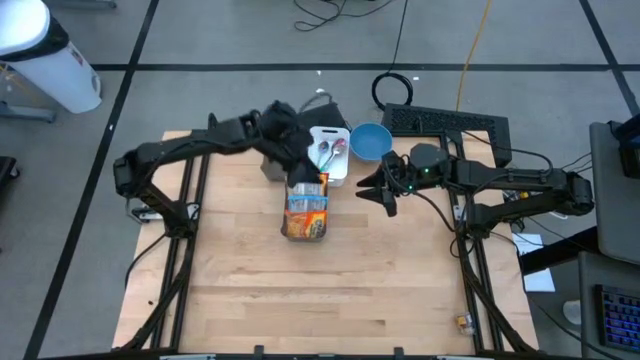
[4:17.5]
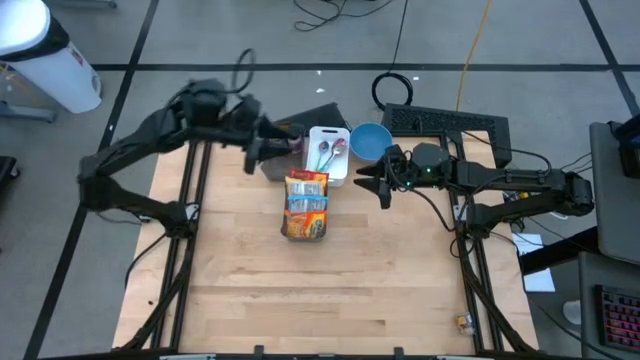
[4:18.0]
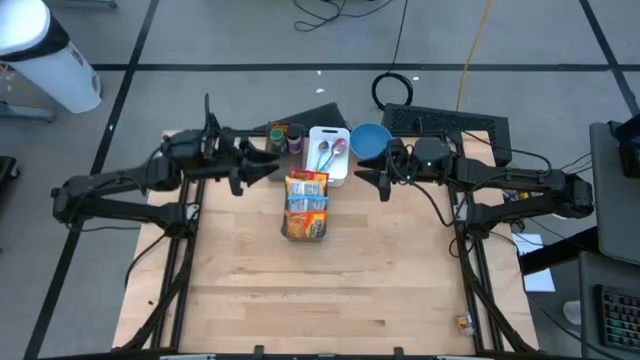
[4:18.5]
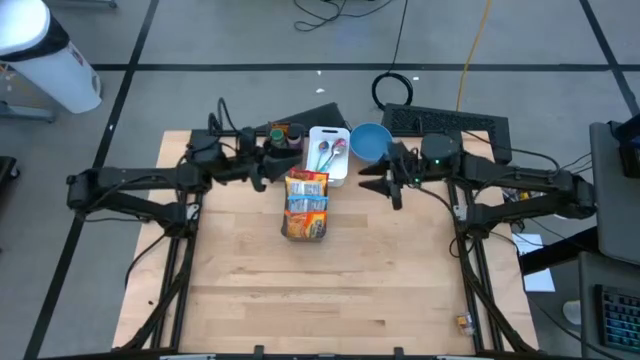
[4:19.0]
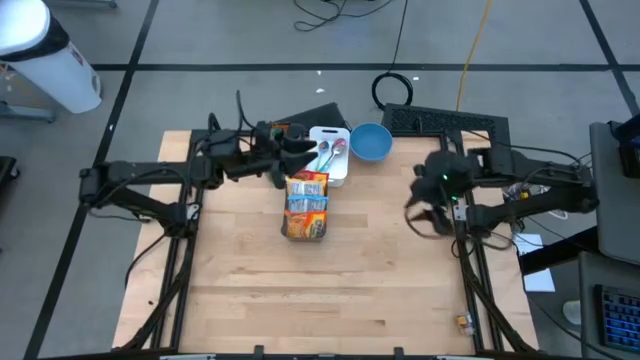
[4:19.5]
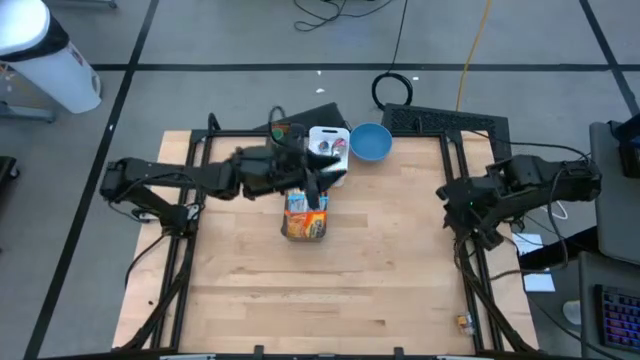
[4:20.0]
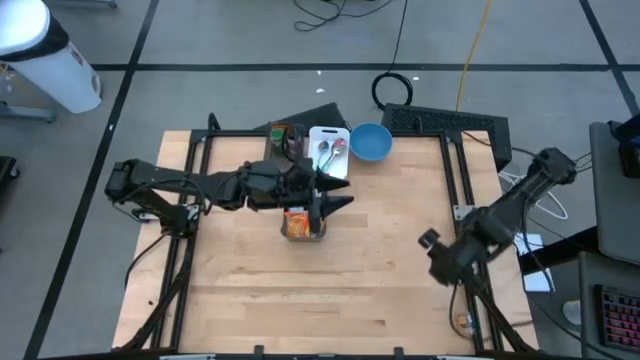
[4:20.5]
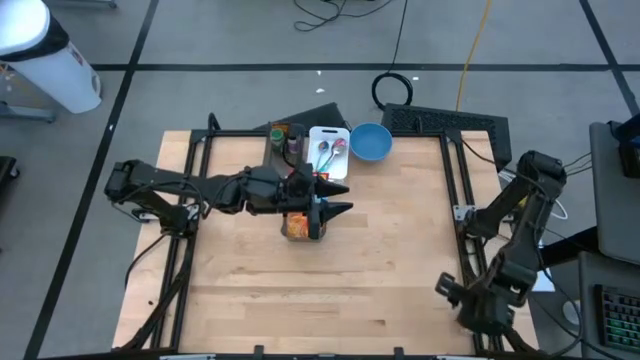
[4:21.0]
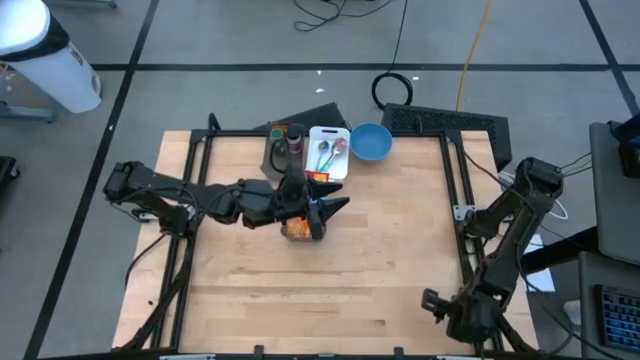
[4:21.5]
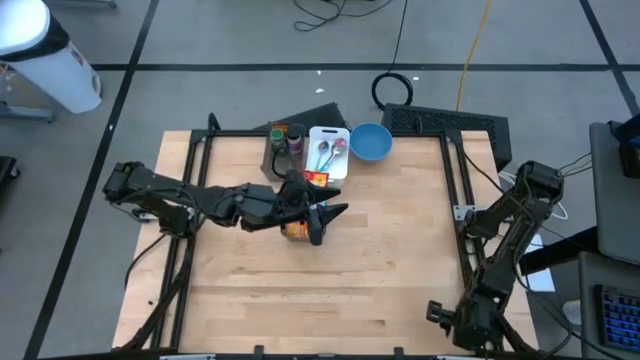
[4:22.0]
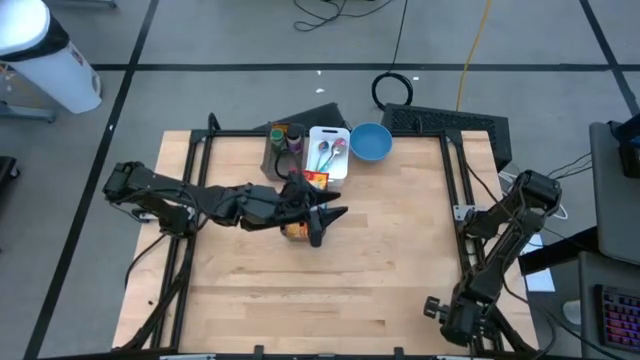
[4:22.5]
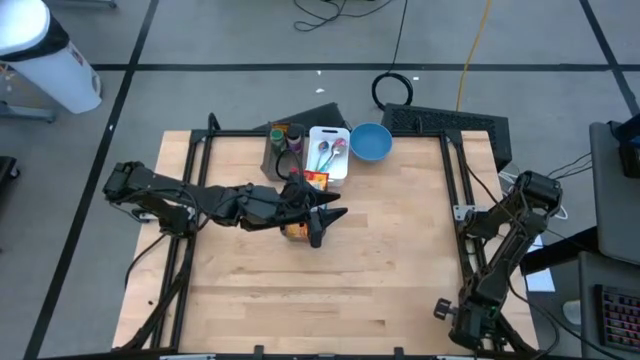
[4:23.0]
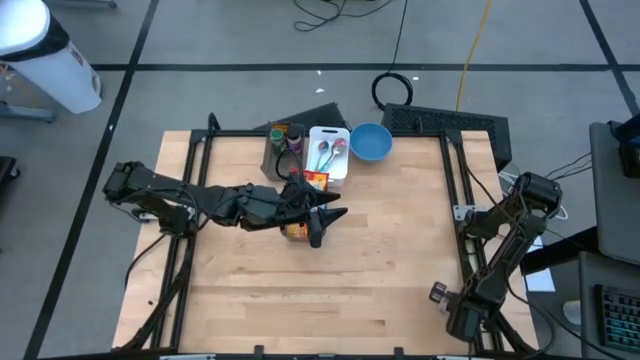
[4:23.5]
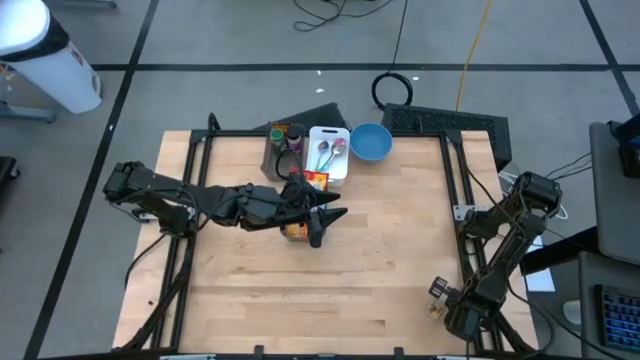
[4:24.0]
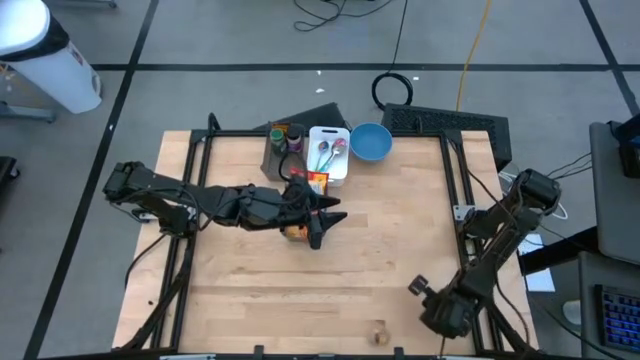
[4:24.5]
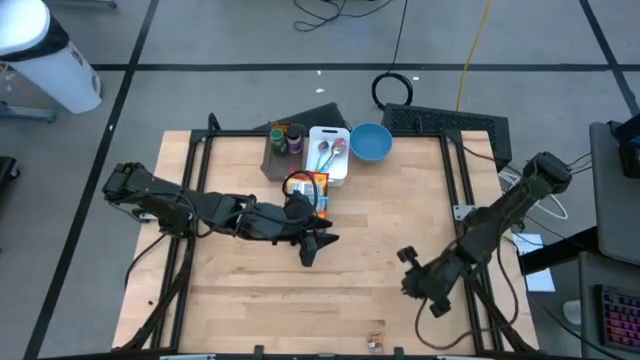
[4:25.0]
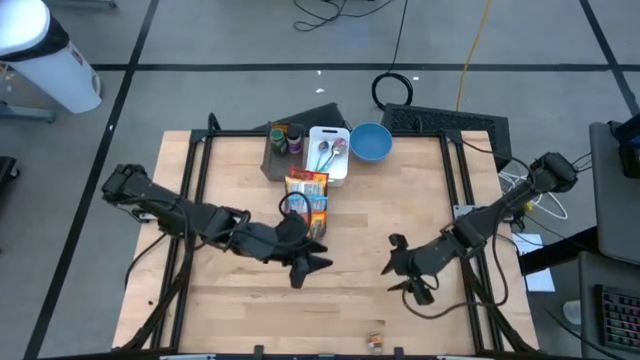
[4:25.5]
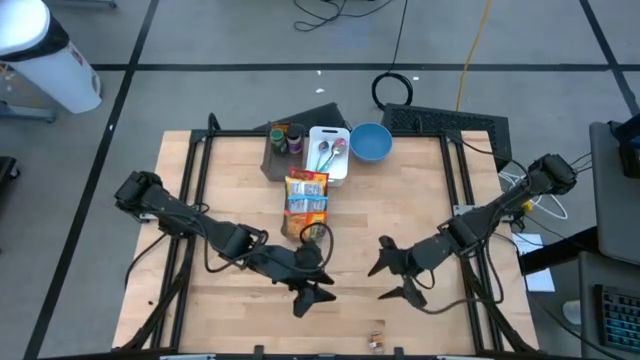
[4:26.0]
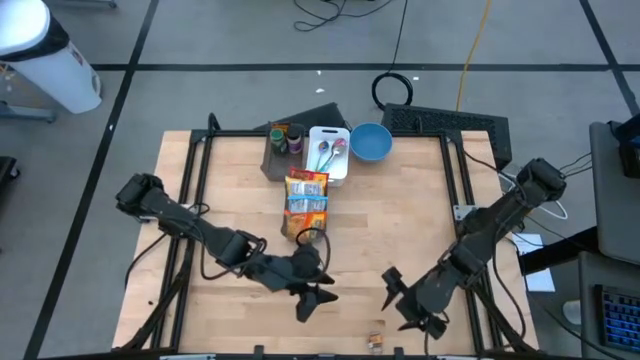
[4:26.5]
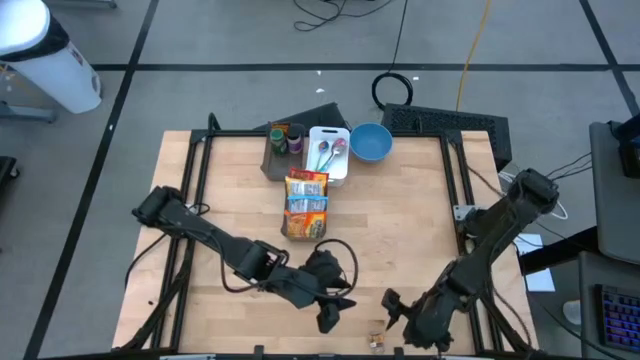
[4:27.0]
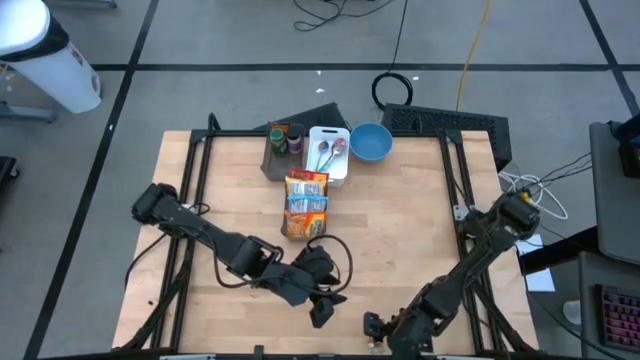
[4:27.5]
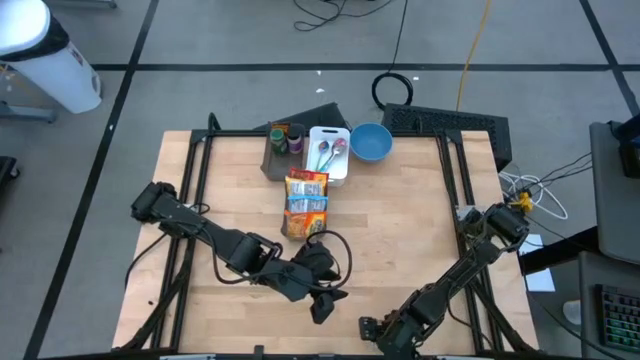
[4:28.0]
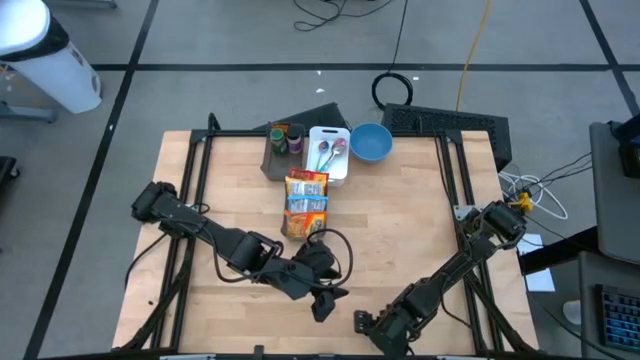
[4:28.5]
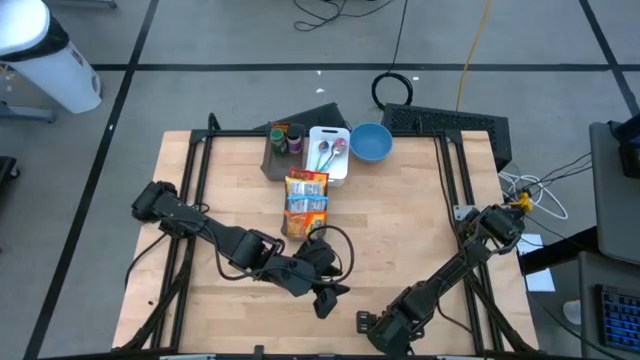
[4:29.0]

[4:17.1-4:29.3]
Task: Pick & Place Food Item
Put the brown spice bottle into the top black bin

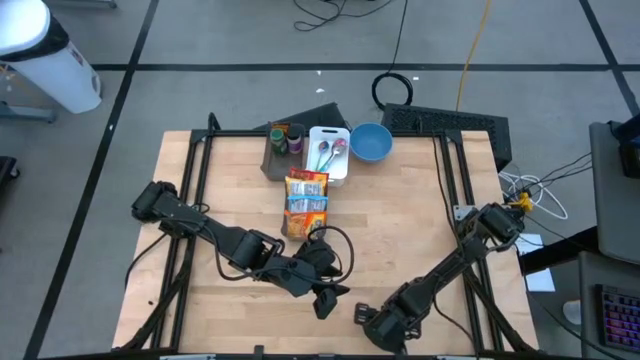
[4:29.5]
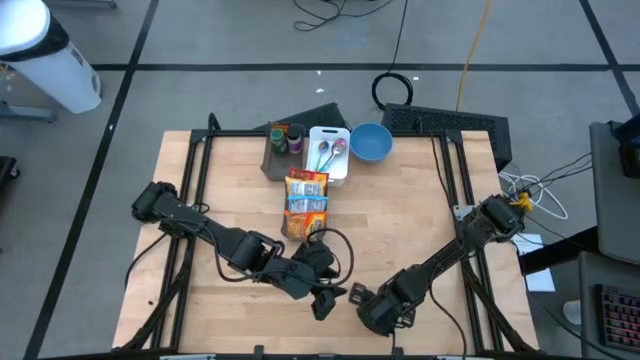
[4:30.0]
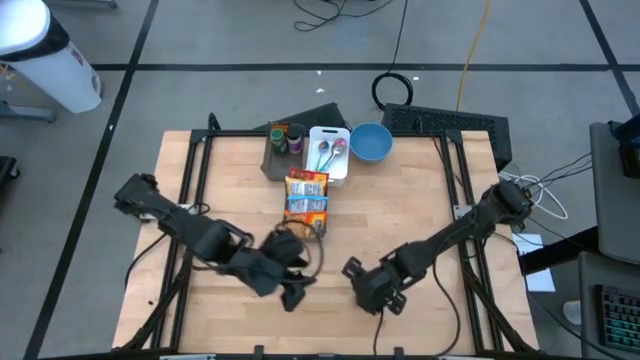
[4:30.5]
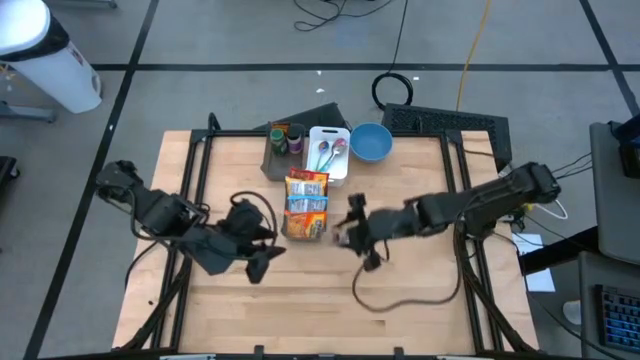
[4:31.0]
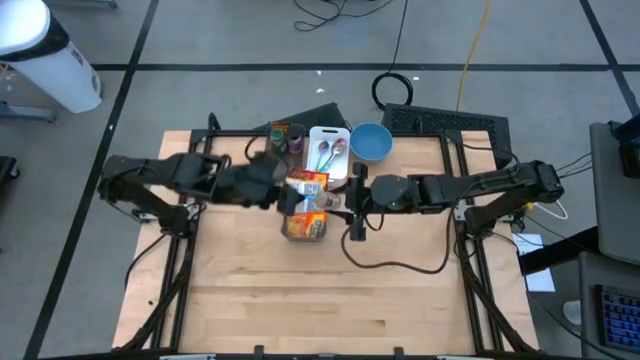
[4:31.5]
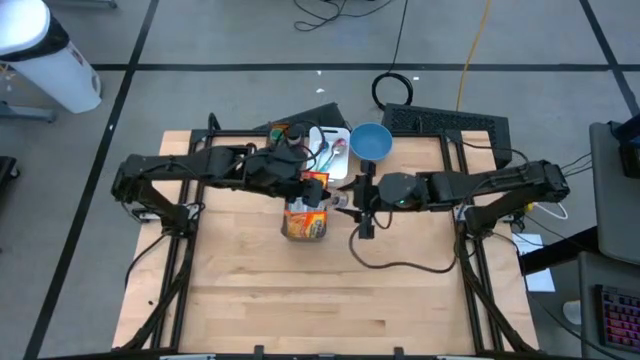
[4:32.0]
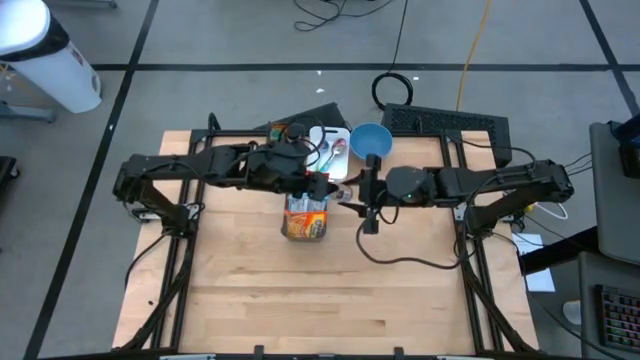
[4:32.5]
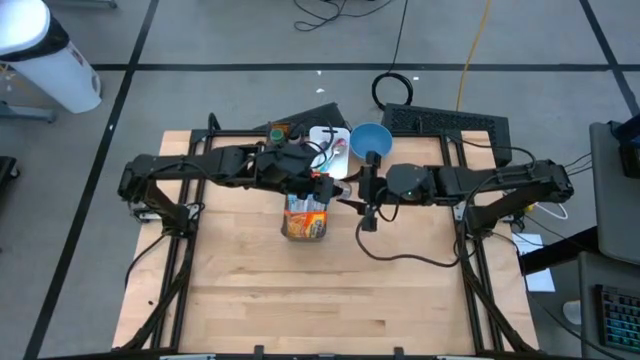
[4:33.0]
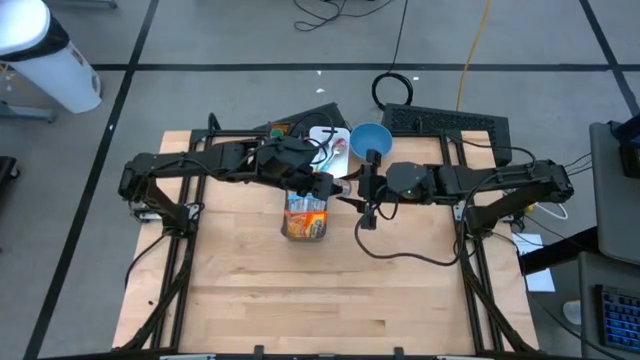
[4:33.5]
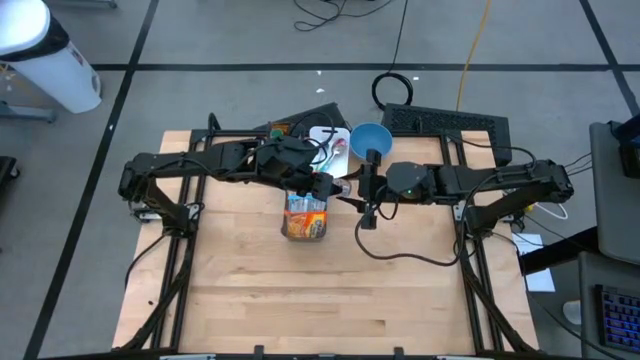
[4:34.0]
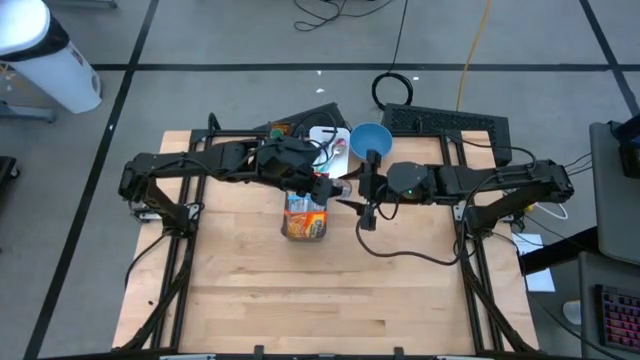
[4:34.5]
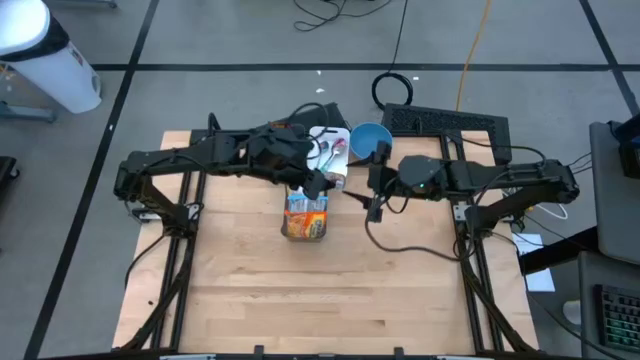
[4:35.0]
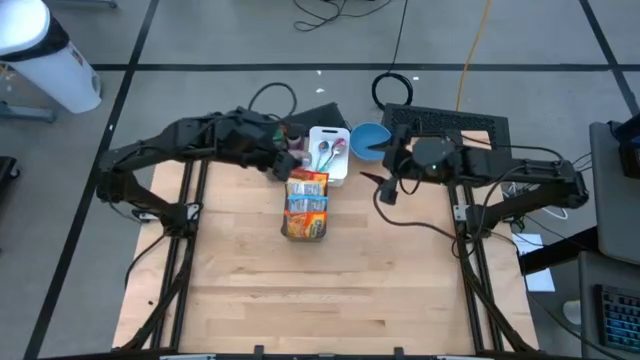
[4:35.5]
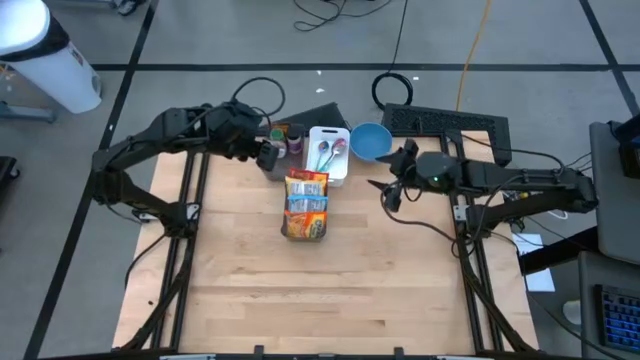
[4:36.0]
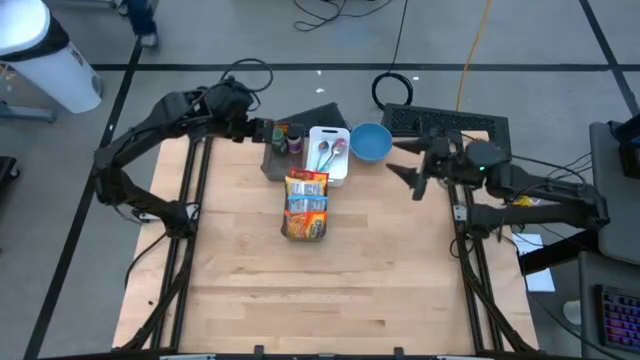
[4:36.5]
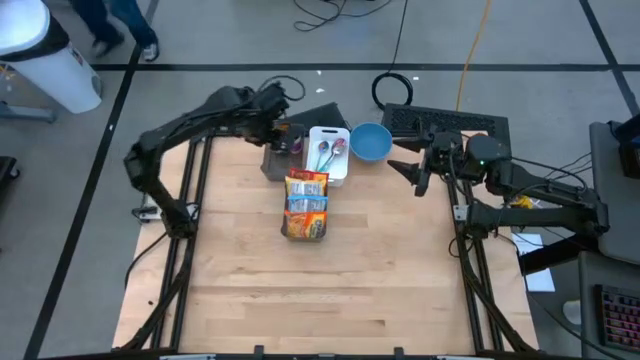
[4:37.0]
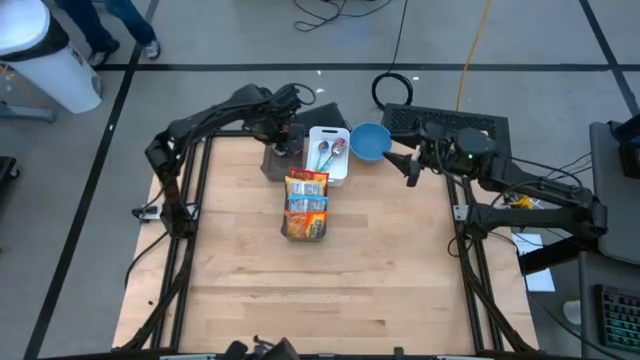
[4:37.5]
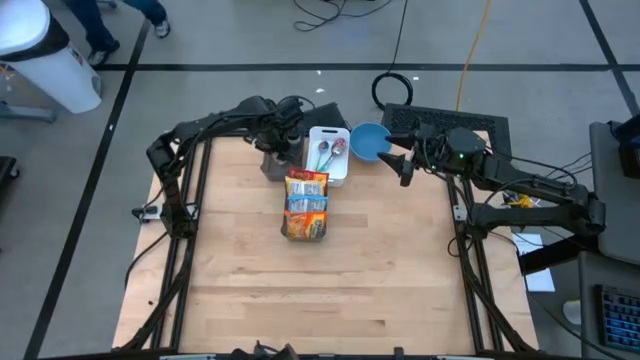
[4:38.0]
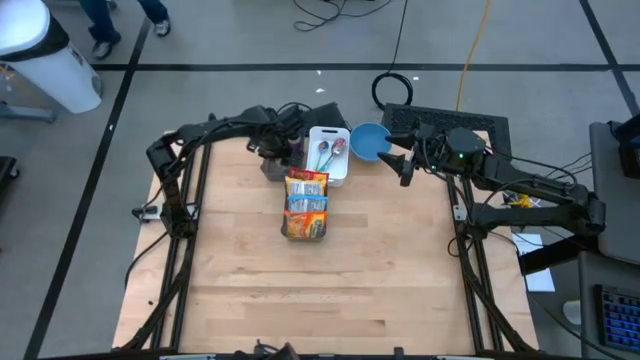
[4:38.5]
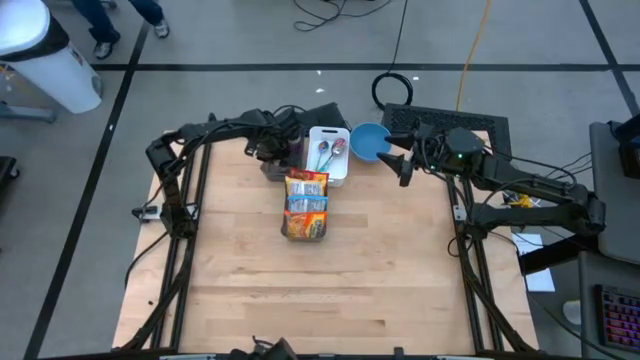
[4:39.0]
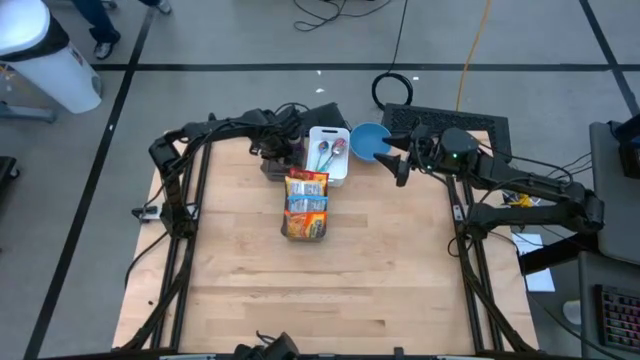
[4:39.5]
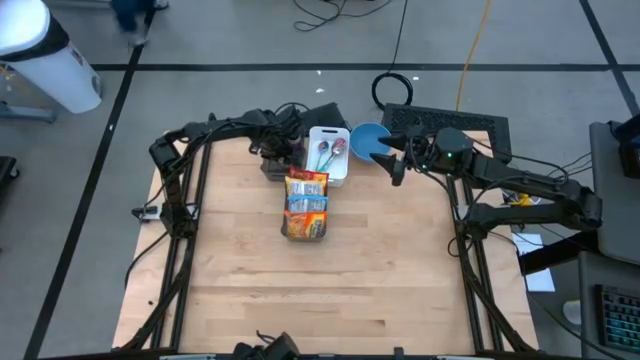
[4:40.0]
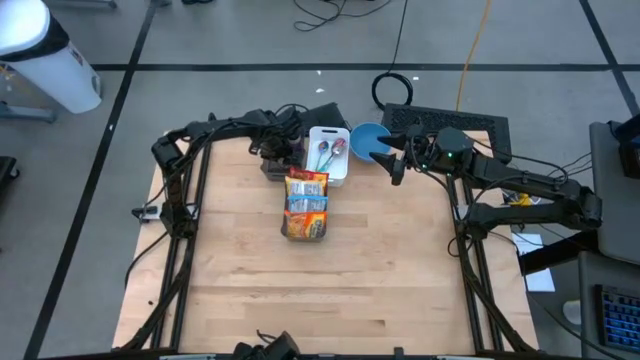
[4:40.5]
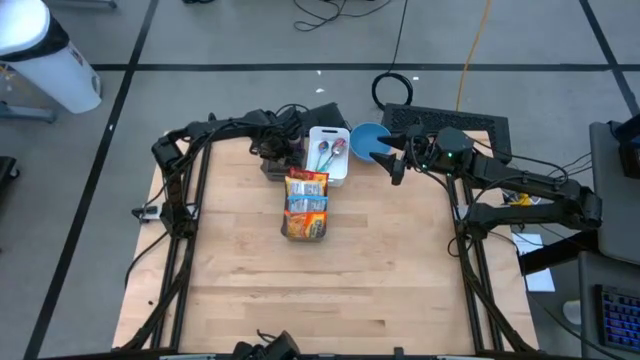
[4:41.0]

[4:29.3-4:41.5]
Put the brown spice bottle into the top black bin
